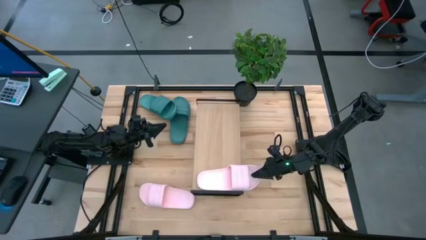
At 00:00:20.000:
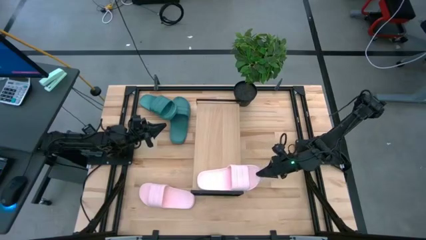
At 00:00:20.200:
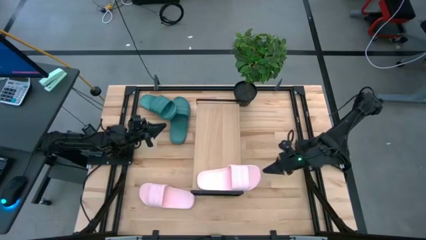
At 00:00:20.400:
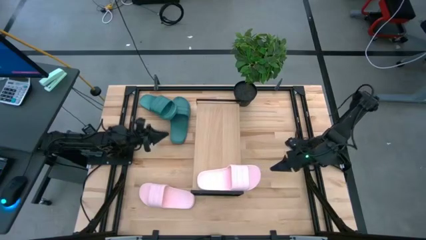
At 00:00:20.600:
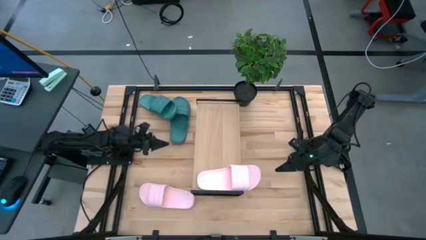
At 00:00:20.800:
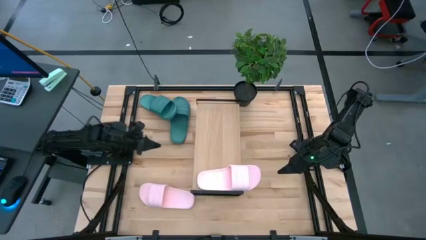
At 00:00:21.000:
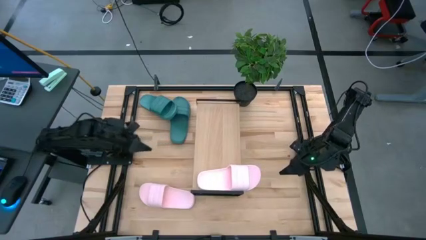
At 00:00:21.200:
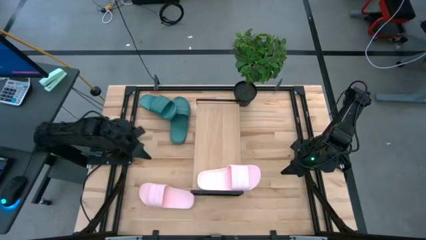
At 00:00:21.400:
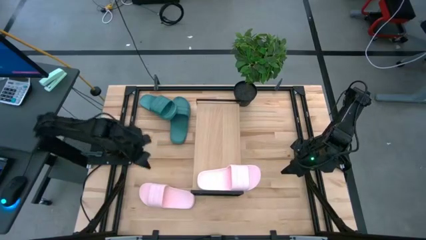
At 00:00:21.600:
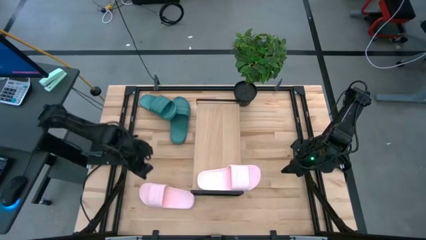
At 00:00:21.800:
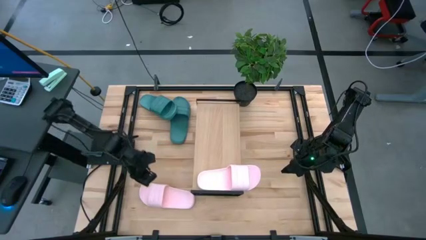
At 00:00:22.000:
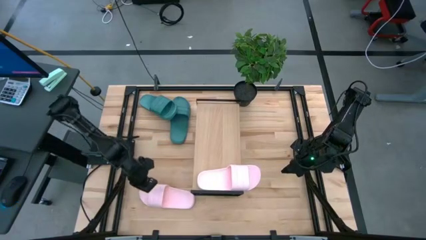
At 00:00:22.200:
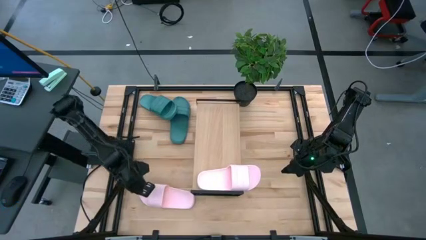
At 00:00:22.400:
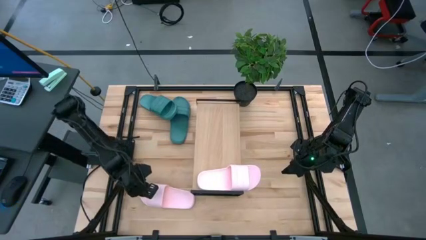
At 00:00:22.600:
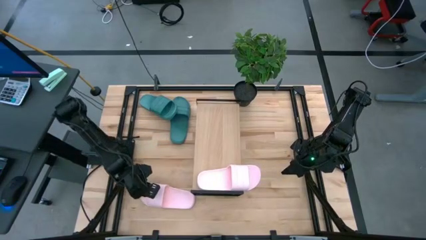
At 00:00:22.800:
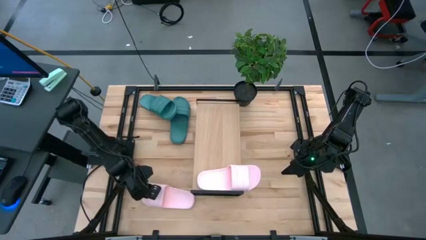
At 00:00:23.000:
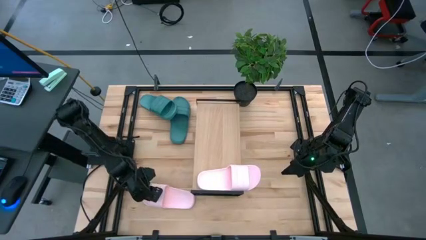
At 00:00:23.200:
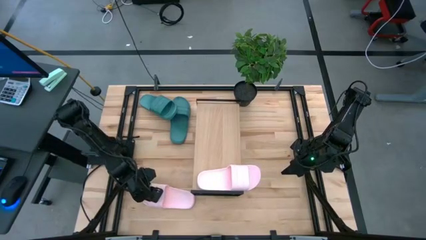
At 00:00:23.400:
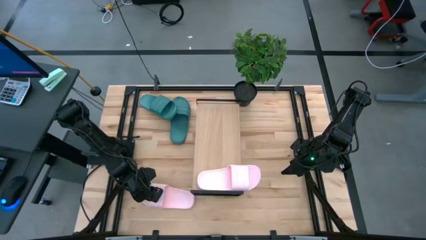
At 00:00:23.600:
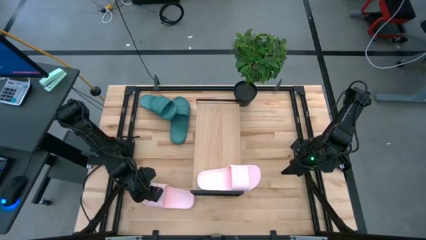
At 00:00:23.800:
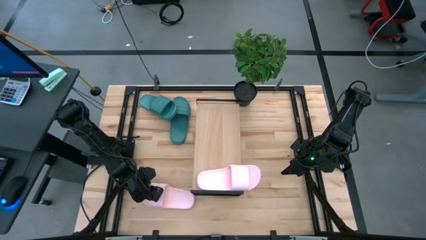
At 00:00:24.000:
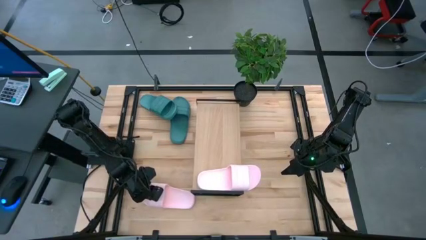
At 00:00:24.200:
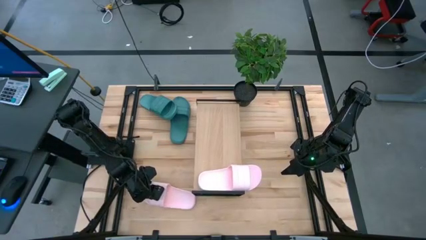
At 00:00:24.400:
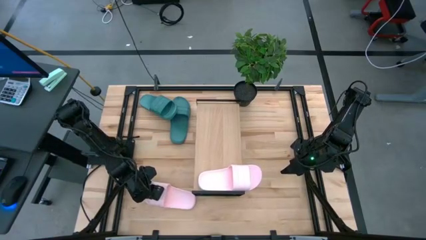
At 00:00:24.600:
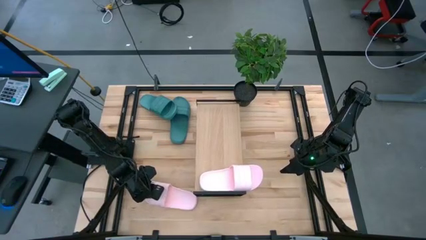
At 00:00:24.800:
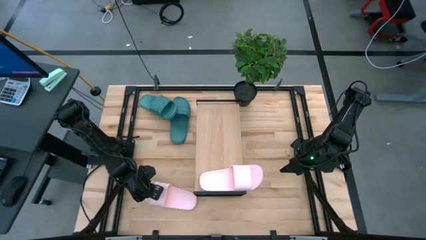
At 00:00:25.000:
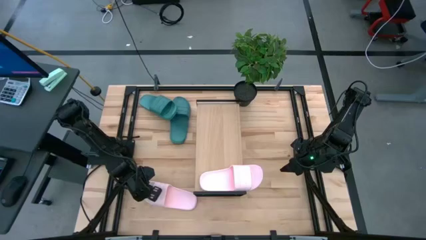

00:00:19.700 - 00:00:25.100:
Task: Pick and place slides into the shelf
Put the pink slide on the shelf
